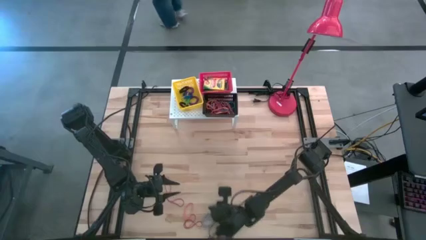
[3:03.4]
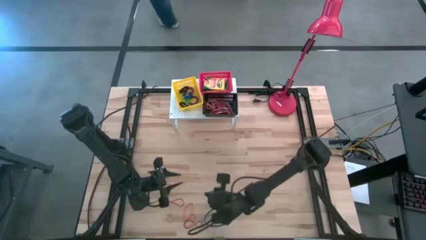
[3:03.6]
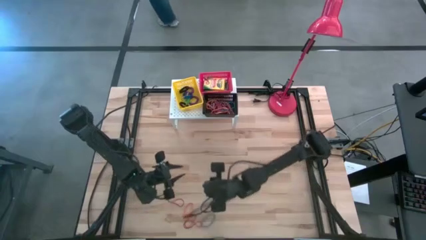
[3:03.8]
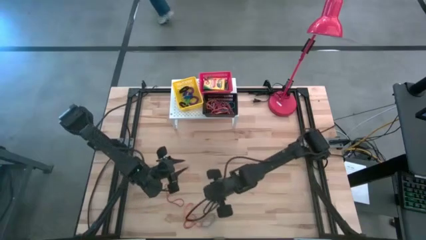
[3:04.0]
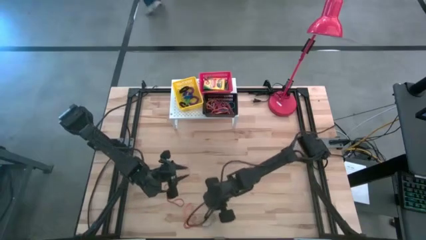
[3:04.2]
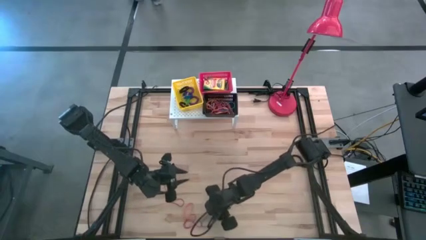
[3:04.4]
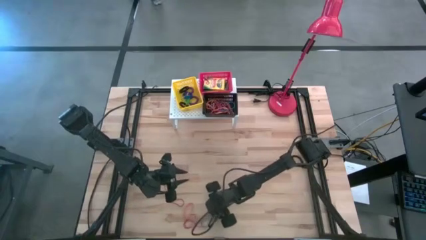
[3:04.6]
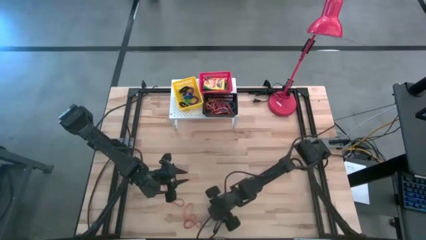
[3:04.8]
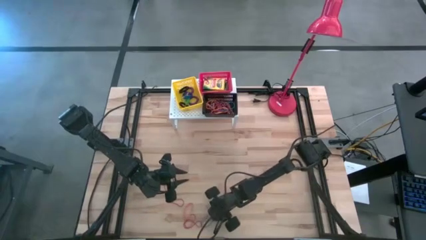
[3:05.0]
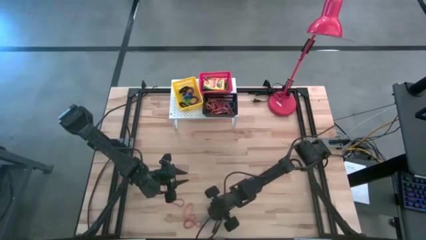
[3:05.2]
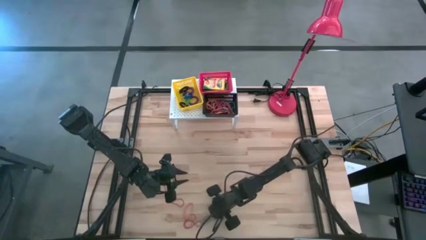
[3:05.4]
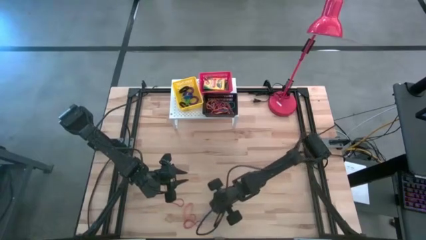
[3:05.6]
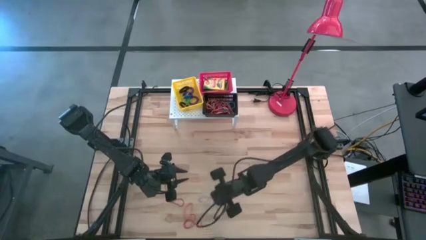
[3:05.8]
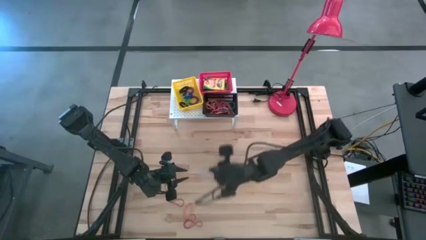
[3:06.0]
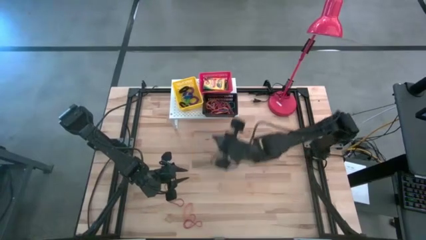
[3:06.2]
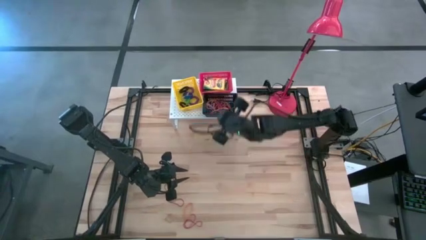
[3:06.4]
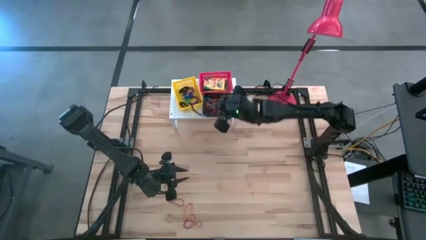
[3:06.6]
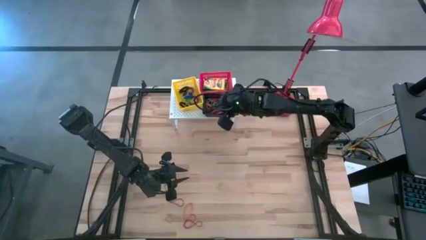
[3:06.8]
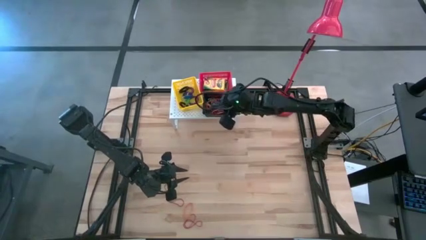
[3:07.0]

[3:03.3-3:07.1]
Task: Pick & Place Office Desk Supplies
Put the blue rubber band into the black bin on the shelf

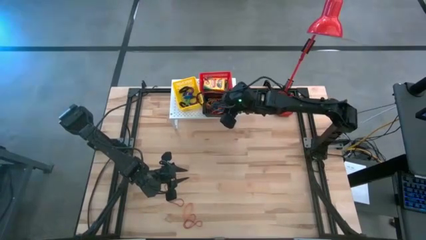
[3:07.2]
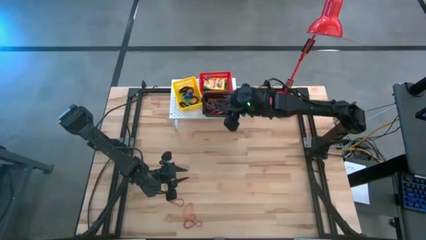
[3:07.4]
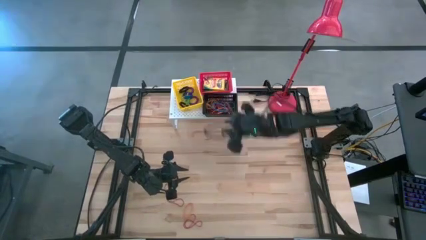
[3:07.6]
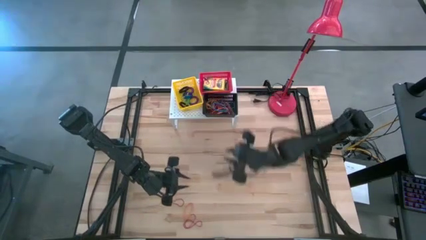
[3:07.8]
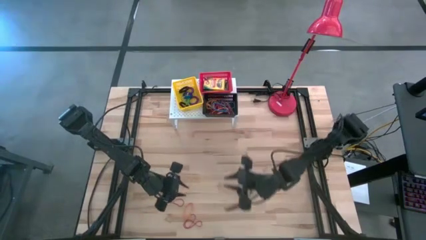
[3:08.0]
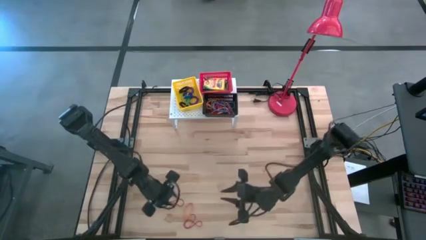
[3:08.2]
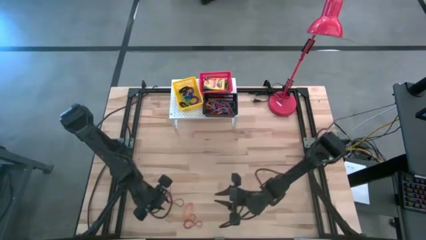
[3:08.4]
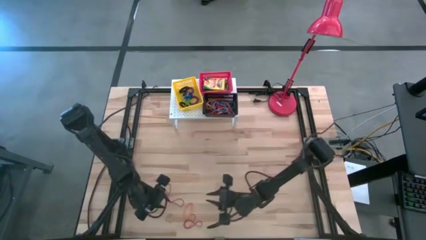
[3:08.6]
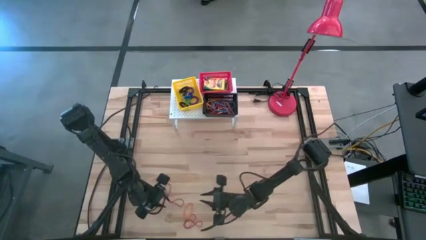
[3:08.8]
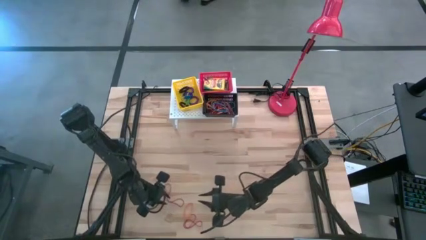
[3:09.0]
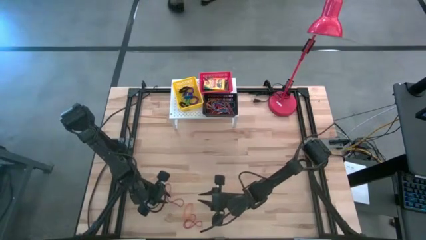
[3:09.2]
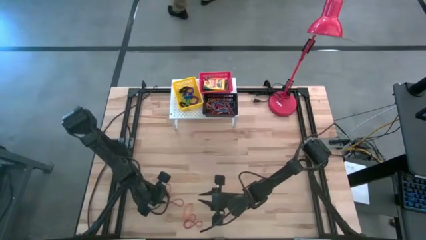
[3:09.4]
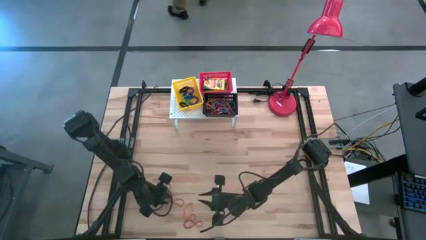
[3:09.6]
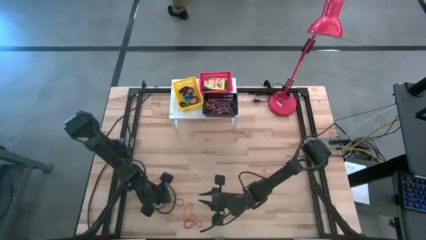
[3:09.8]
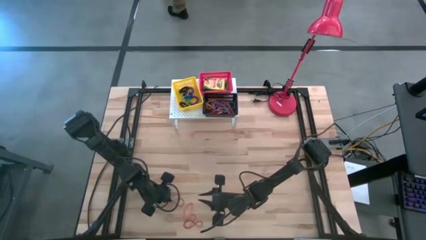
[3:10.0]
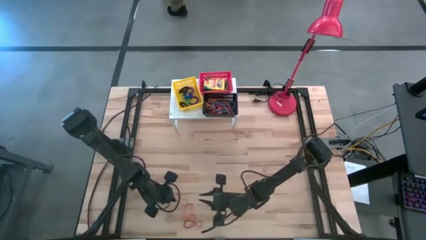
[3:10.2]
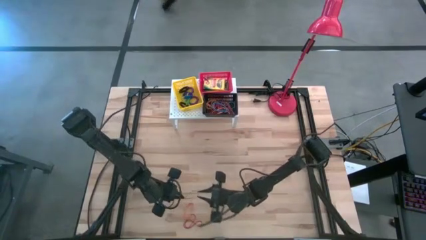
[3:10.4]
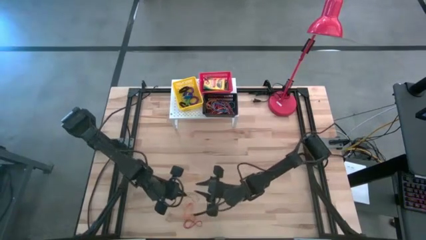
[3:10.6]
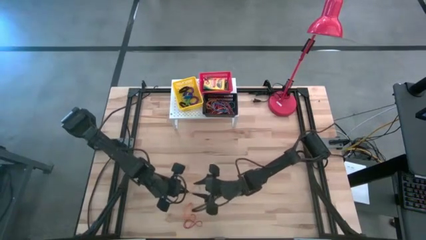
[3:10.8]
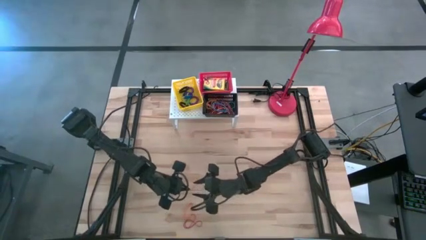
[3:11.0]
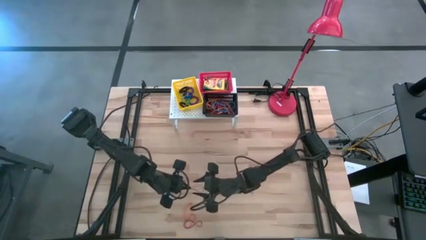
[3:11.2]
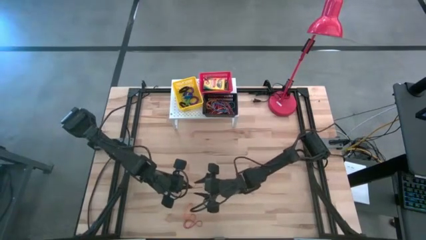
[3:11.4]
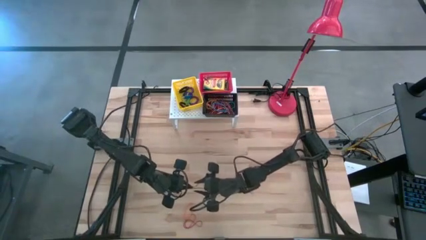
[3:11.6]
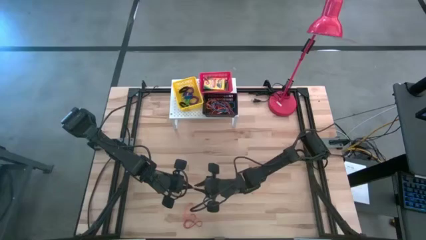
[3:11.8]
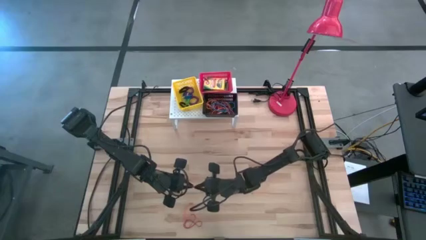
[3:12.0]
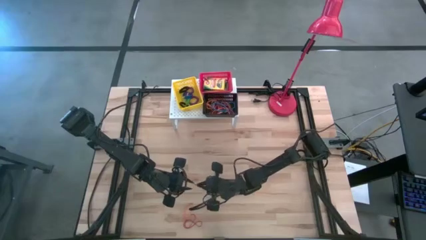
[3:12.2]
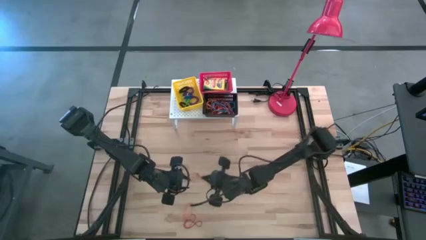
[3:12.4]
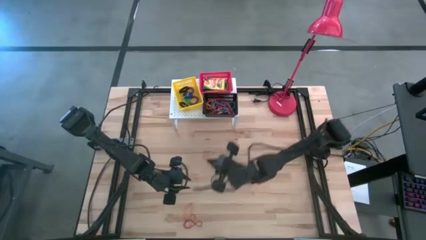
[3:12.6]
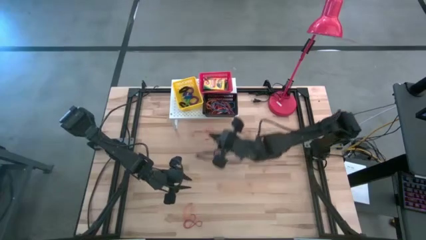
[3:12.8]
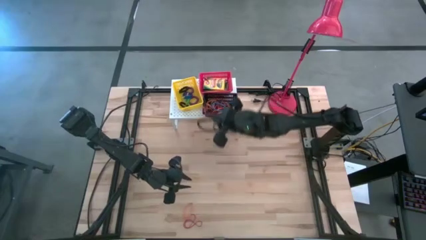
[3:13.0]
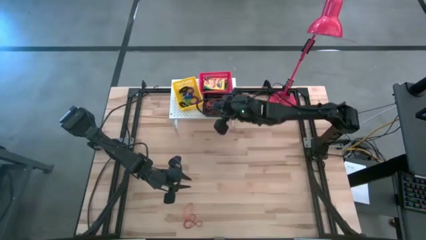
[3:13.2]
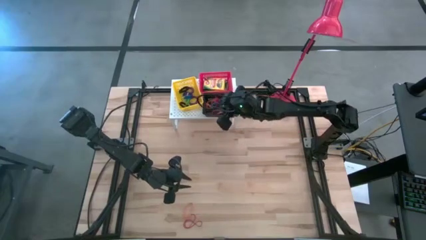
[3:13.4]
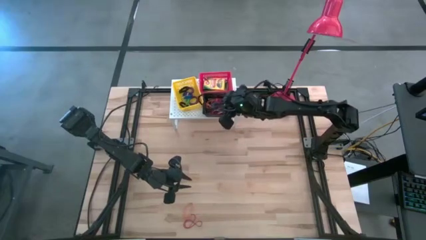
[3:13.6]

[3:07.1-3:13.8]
Put the red rubber band into the black bin on the shelf

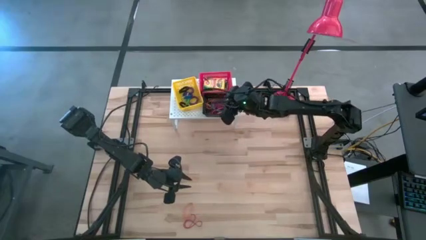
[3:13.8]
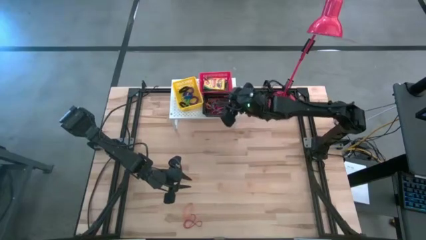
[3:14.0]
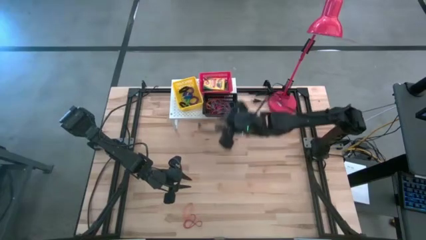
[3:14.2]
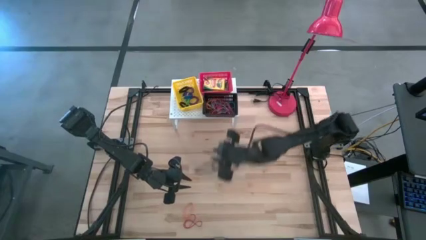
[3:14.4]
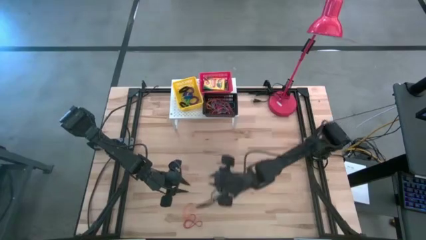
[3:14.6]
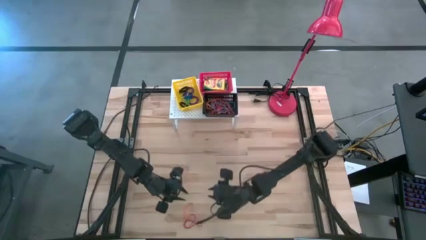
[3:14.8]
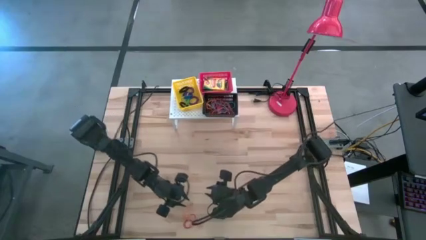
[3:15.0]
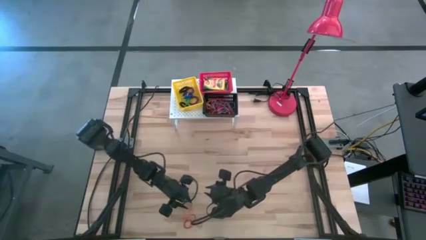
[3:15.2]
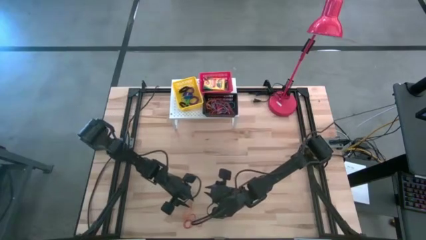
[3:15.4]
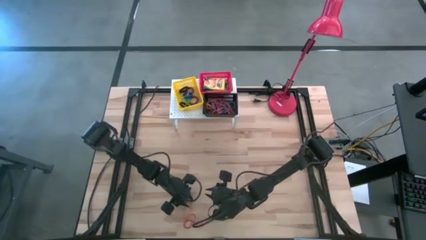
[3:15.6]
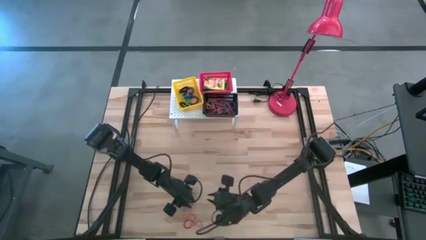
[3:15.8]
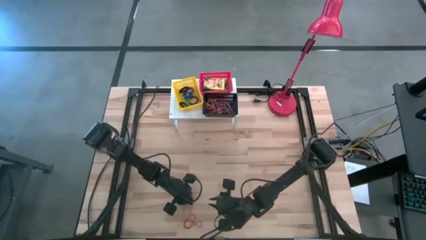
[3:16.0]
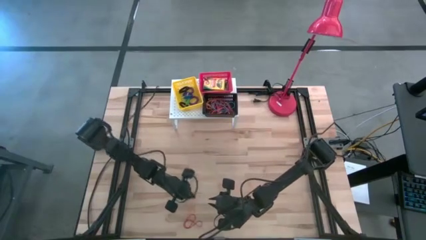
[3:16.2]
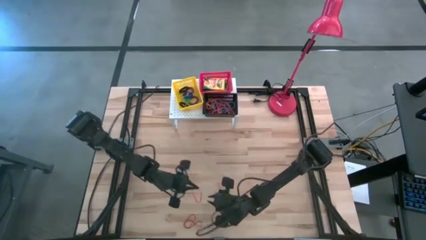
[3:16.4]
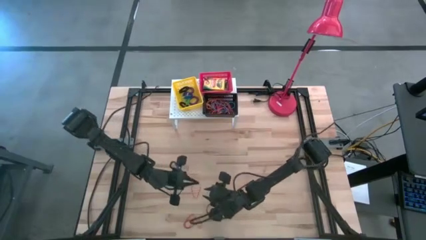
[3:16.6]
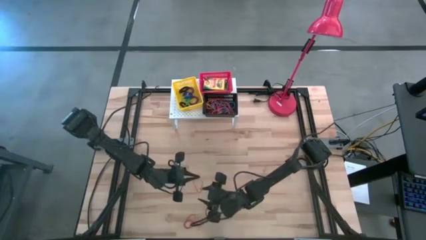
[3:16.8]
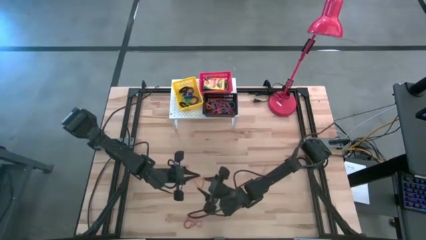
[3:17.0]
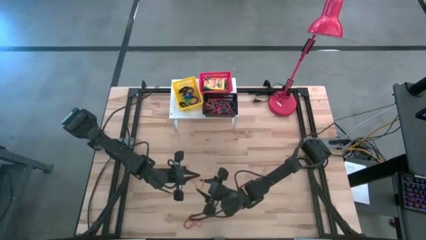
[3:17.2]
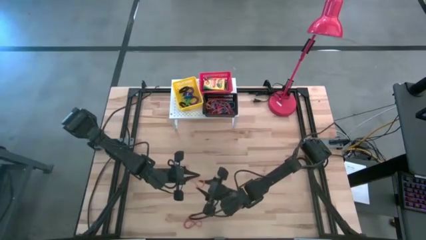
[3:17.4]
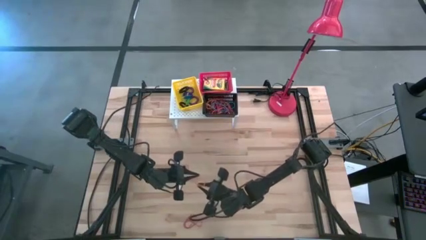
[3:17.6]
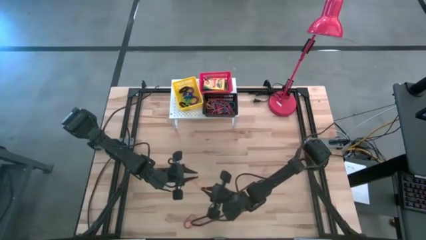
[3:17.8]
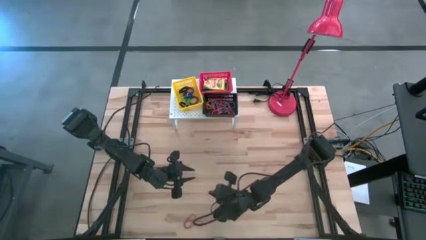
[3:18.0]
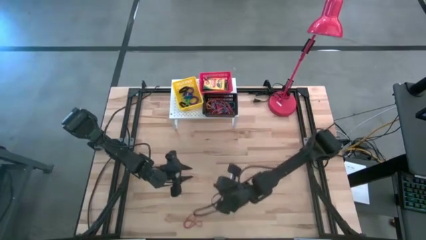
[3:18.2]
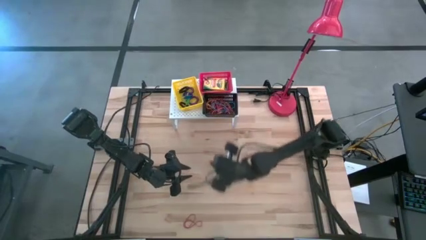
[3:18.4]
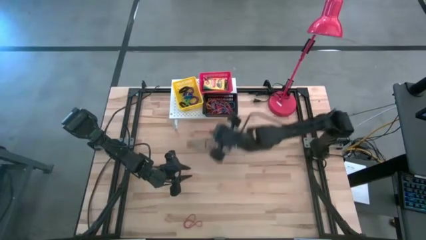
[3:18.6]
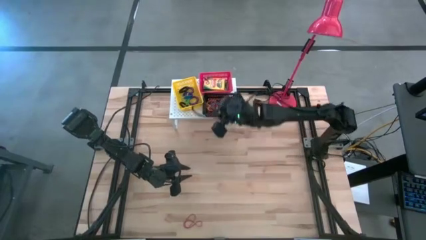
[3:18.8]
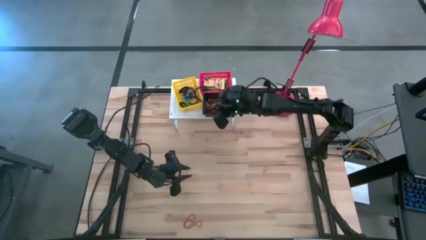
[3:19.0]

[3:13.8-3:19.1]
Put the orange rubber band into the black bin on the shelf

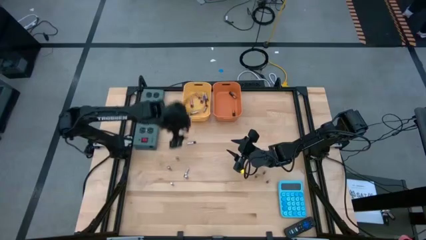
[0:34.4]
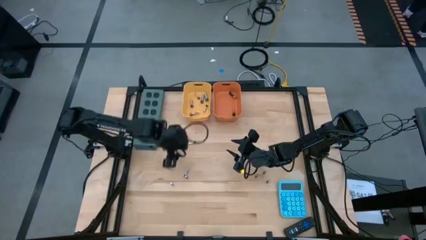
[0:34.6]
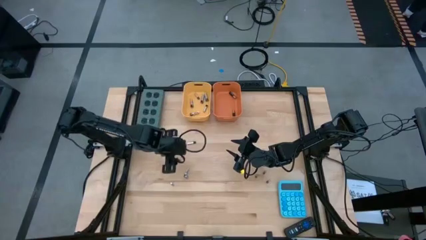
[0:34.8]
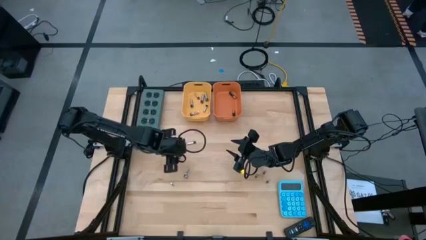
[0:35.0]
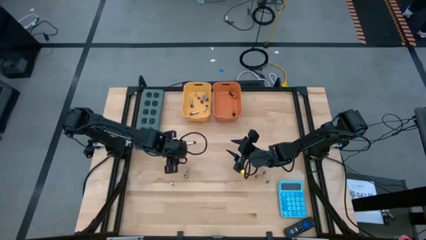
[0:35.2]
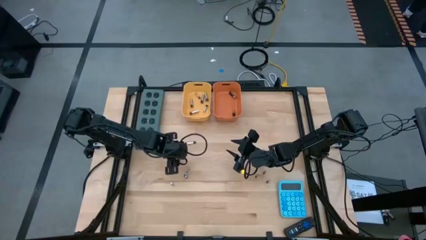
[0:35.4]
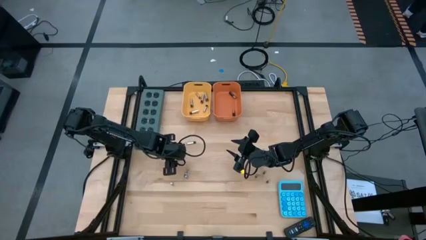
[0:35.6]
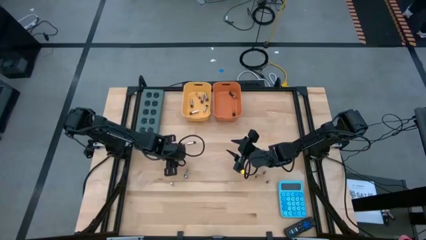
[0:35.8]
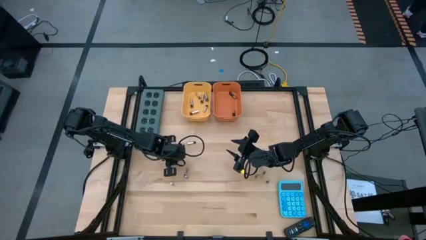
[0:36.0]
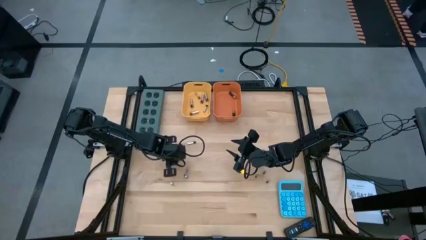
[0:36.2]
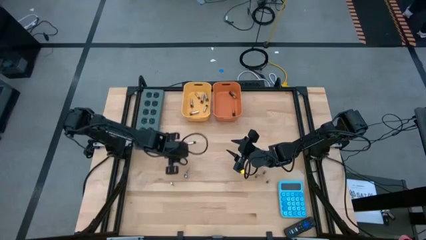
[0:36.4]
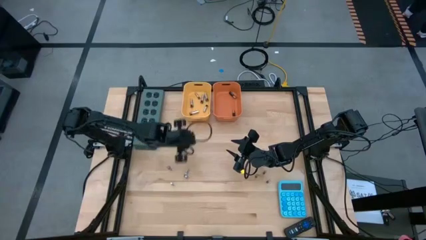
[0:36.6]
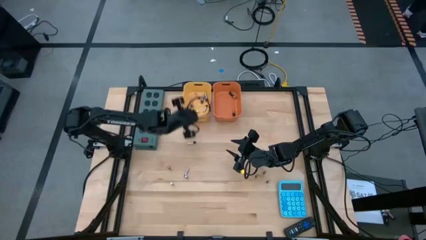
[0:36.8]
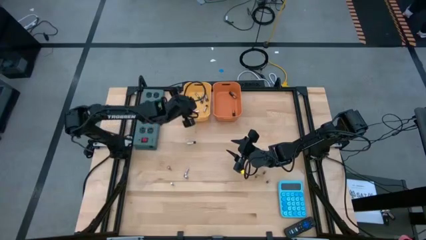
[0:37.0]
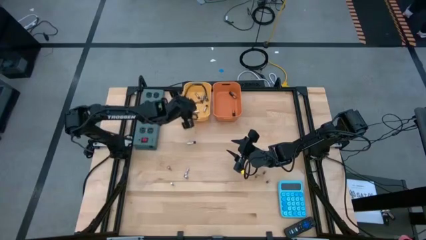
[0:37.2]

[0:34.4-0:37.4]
Task: Sort batteries
Put the silver battery into the yellow bin
